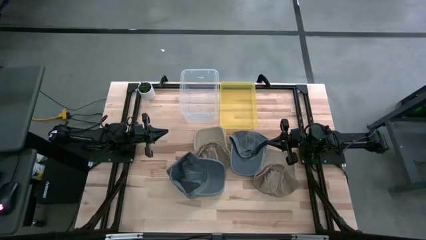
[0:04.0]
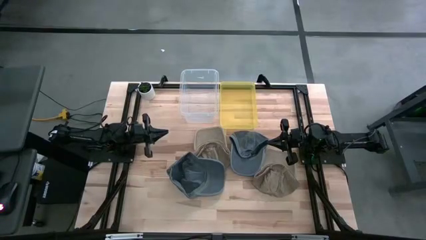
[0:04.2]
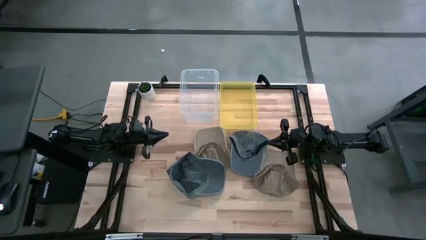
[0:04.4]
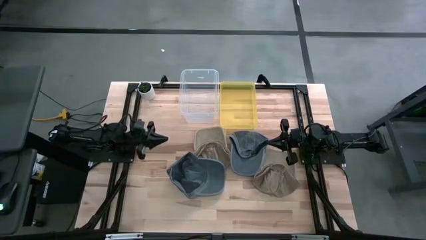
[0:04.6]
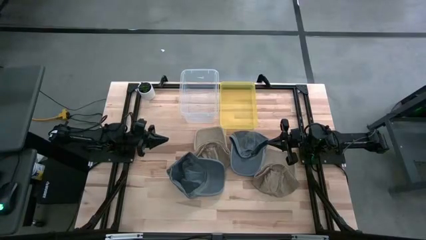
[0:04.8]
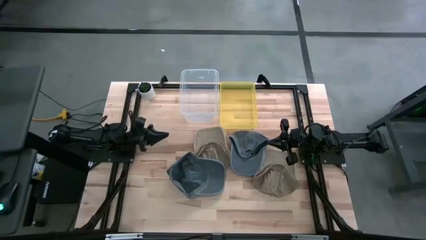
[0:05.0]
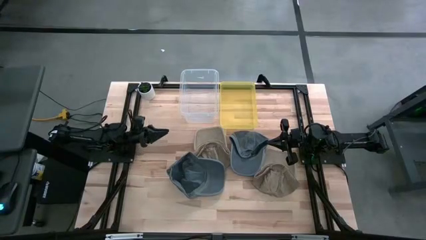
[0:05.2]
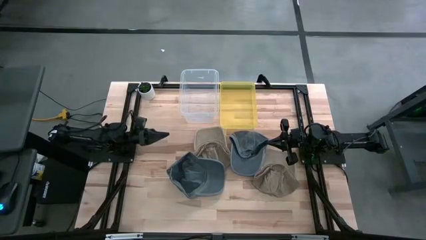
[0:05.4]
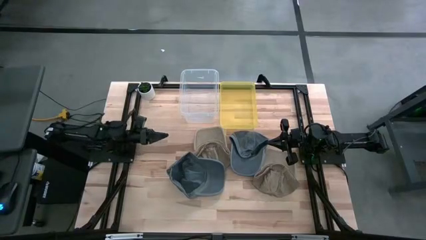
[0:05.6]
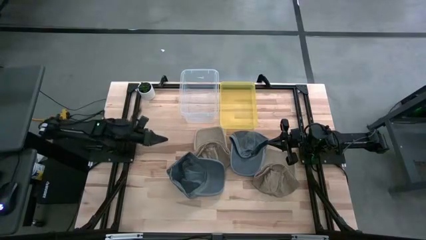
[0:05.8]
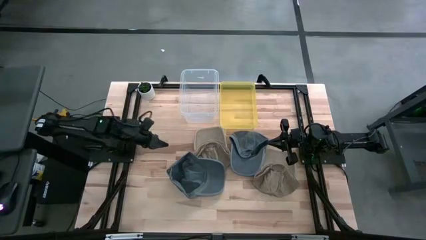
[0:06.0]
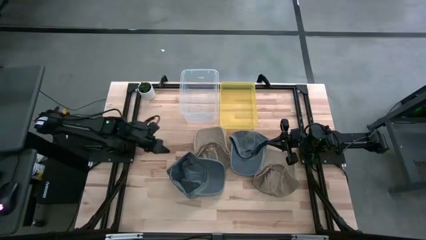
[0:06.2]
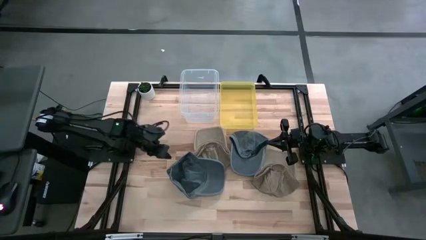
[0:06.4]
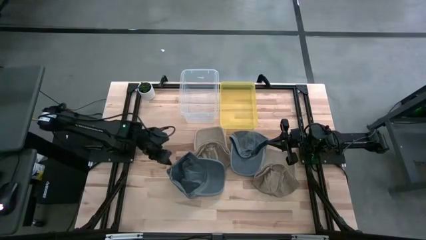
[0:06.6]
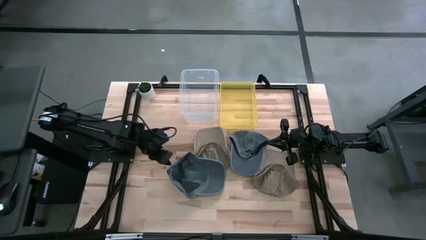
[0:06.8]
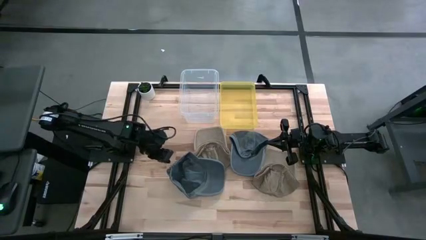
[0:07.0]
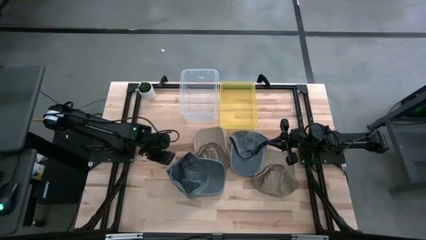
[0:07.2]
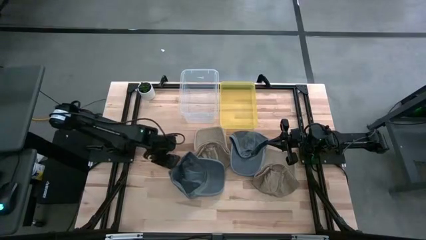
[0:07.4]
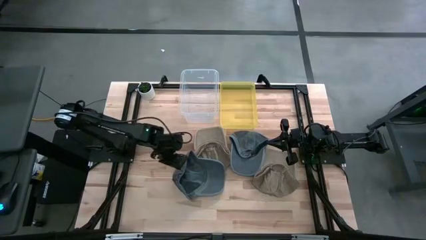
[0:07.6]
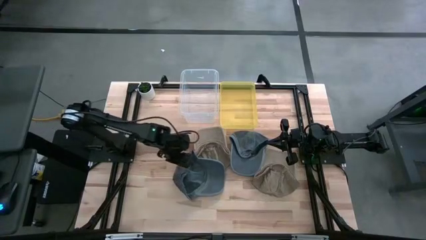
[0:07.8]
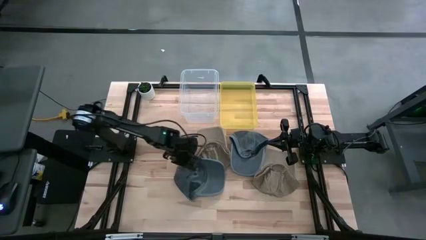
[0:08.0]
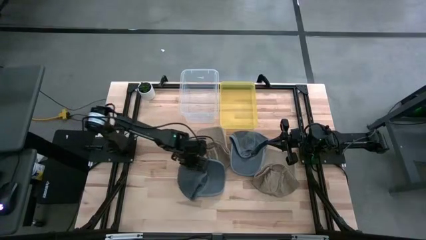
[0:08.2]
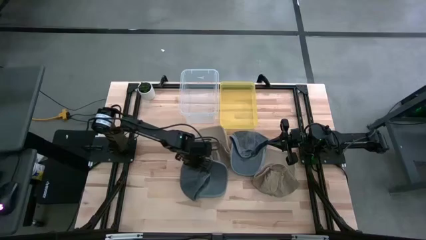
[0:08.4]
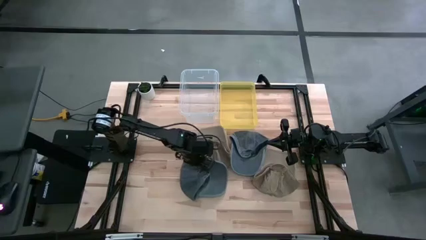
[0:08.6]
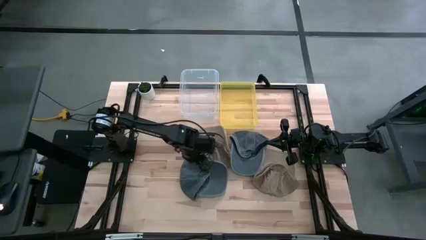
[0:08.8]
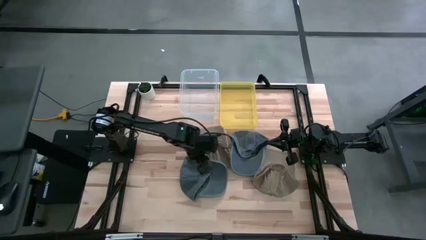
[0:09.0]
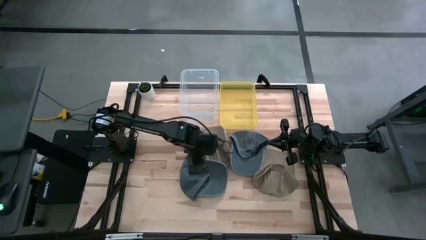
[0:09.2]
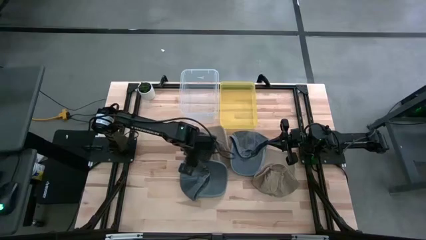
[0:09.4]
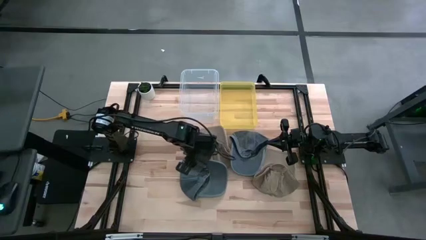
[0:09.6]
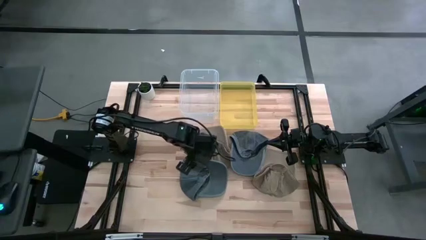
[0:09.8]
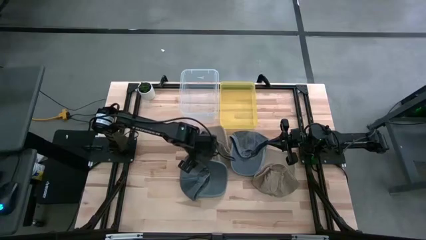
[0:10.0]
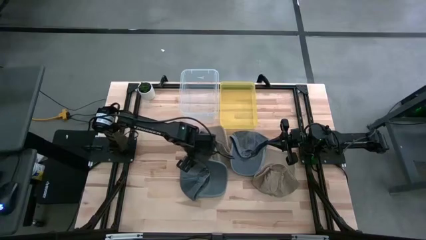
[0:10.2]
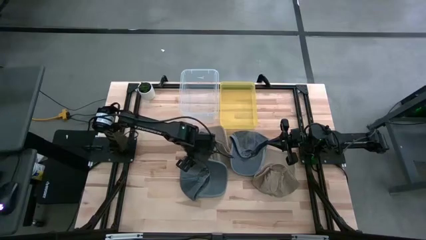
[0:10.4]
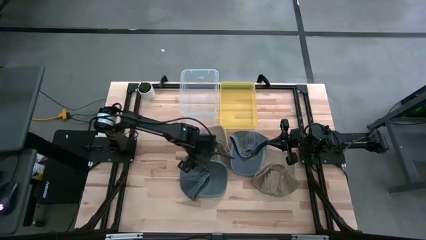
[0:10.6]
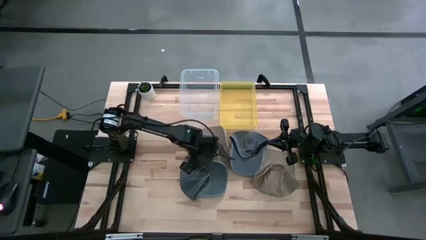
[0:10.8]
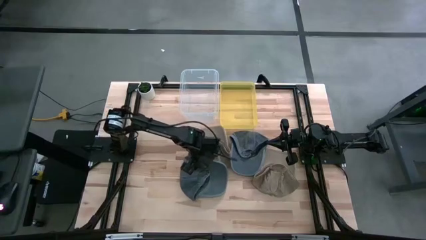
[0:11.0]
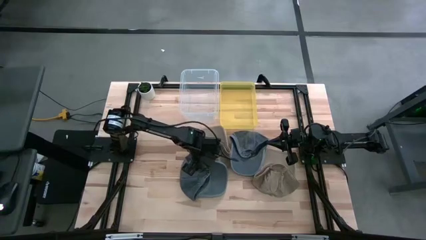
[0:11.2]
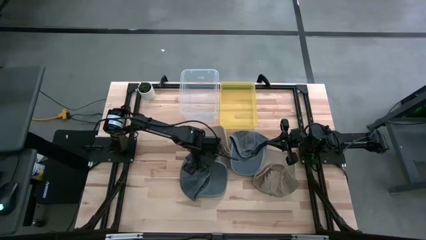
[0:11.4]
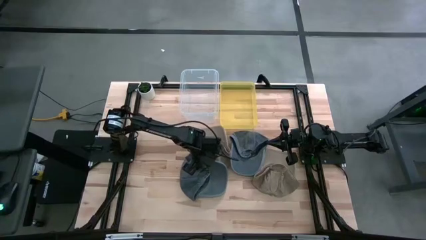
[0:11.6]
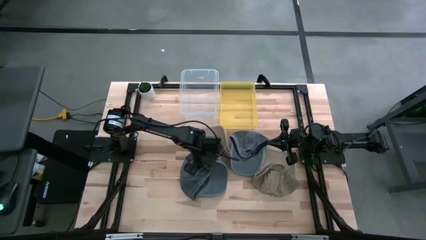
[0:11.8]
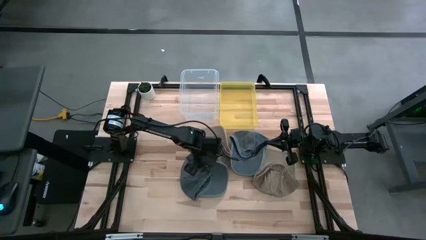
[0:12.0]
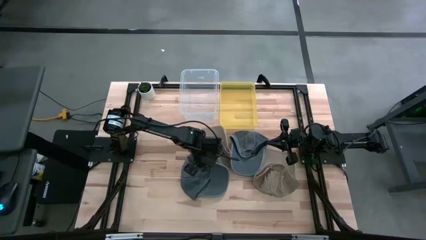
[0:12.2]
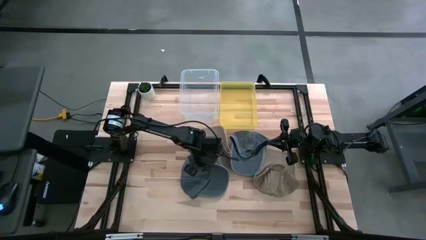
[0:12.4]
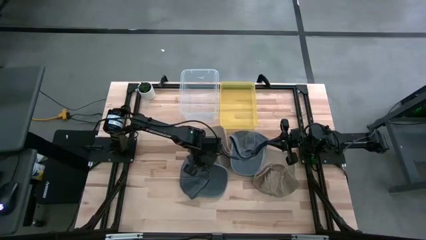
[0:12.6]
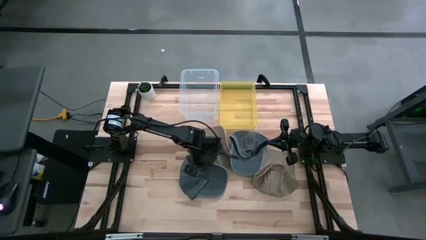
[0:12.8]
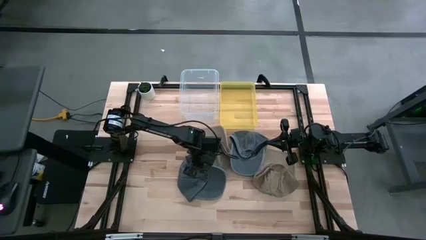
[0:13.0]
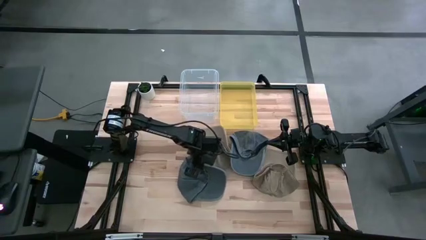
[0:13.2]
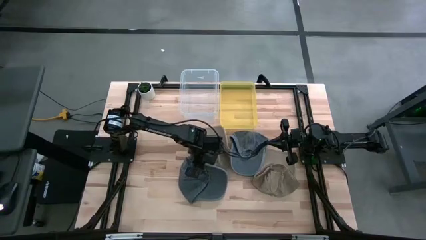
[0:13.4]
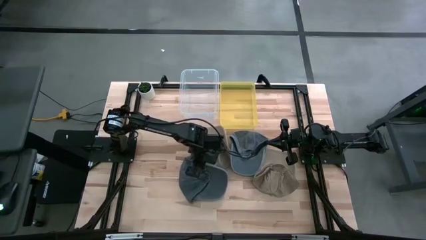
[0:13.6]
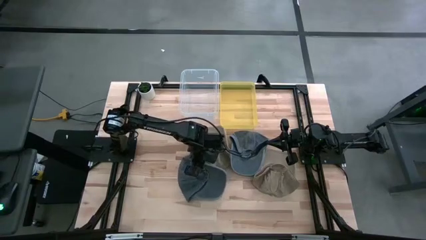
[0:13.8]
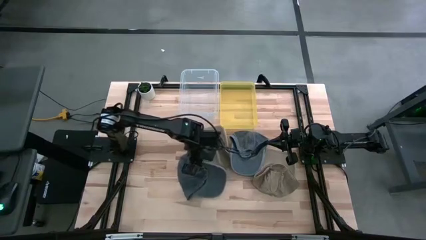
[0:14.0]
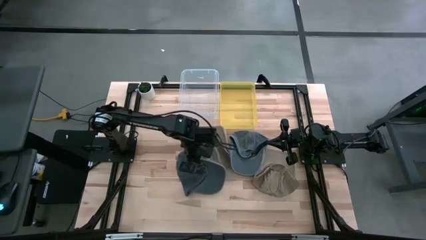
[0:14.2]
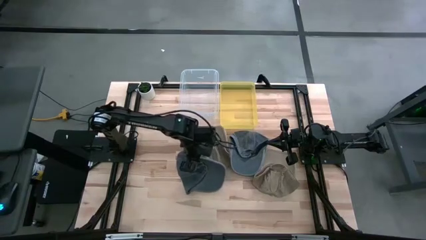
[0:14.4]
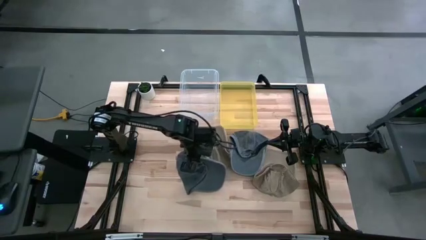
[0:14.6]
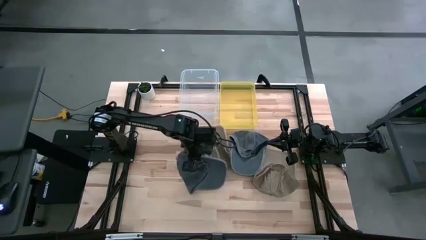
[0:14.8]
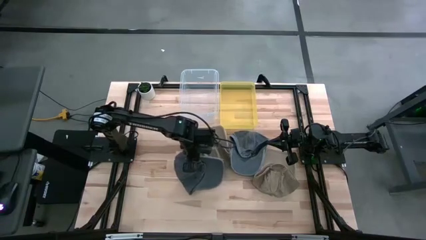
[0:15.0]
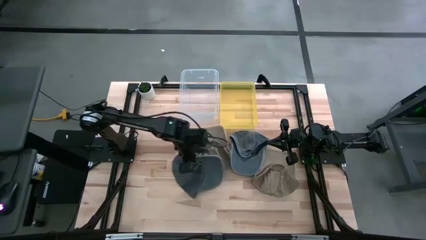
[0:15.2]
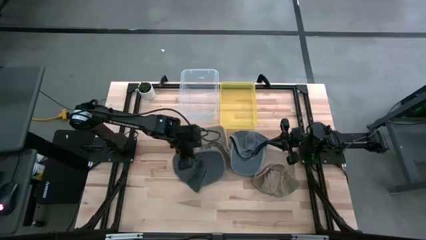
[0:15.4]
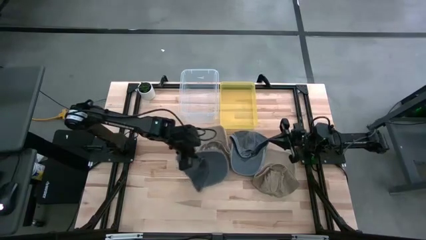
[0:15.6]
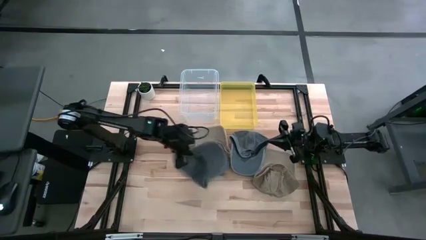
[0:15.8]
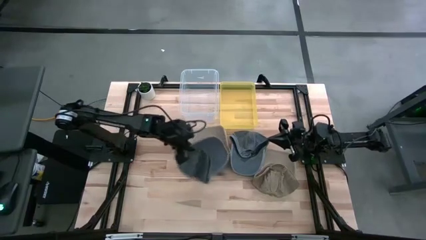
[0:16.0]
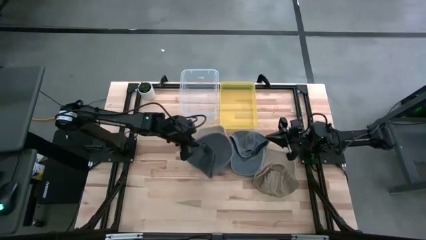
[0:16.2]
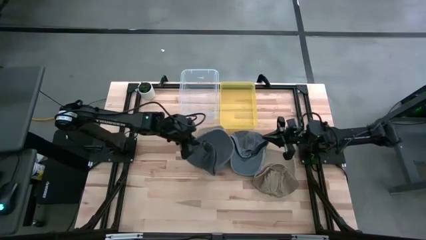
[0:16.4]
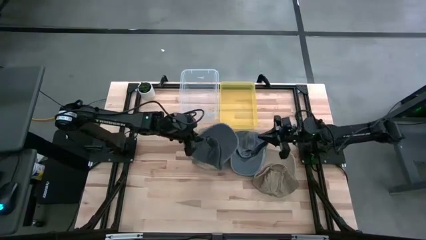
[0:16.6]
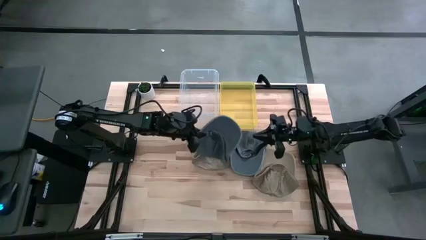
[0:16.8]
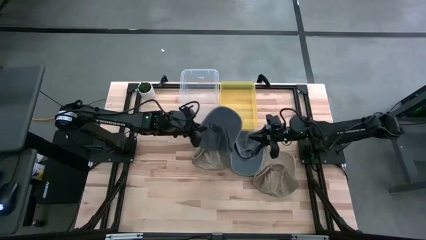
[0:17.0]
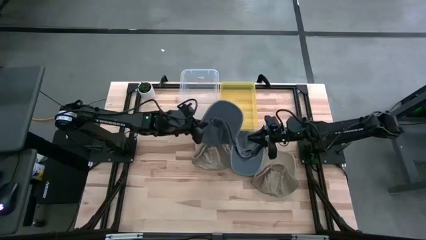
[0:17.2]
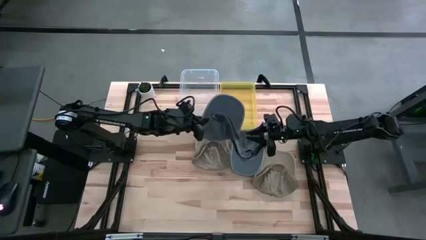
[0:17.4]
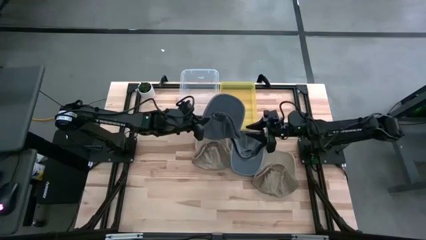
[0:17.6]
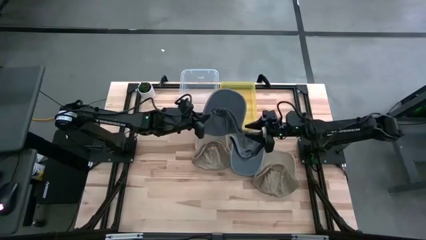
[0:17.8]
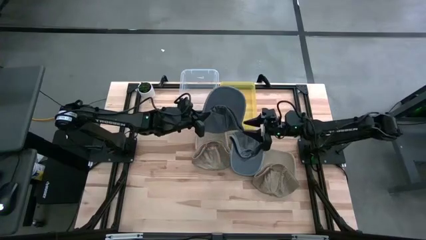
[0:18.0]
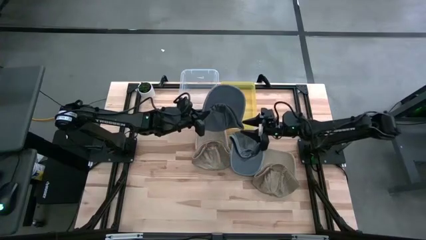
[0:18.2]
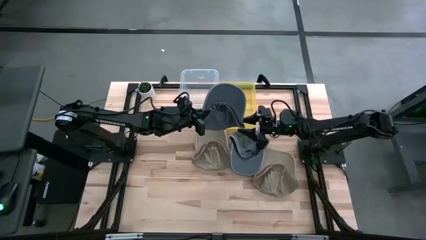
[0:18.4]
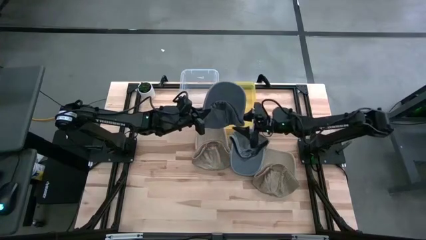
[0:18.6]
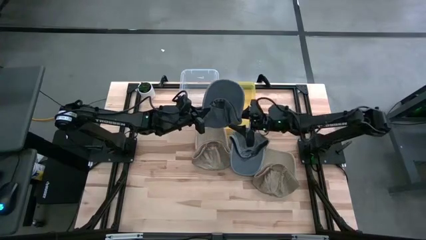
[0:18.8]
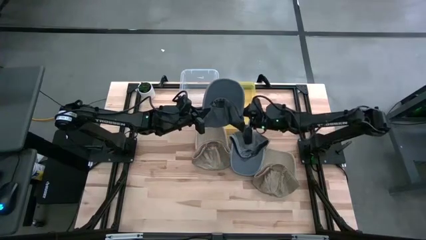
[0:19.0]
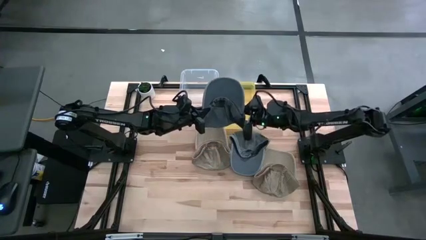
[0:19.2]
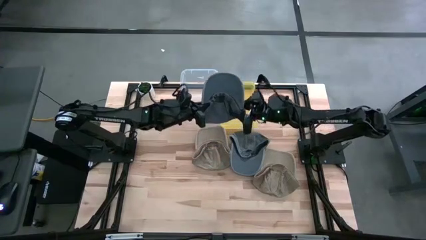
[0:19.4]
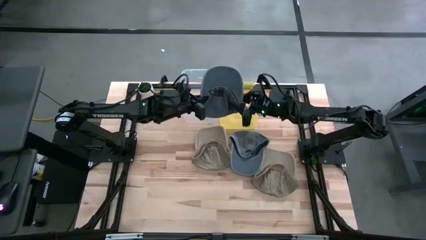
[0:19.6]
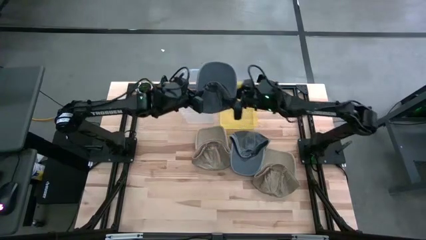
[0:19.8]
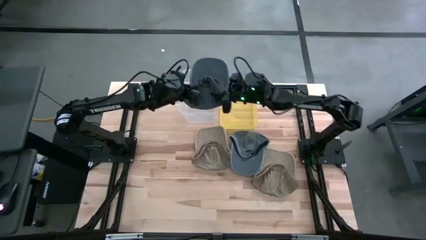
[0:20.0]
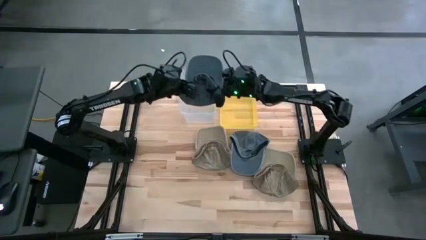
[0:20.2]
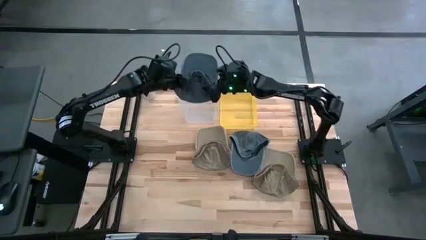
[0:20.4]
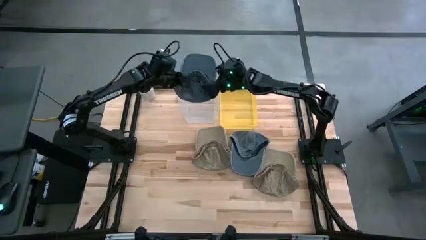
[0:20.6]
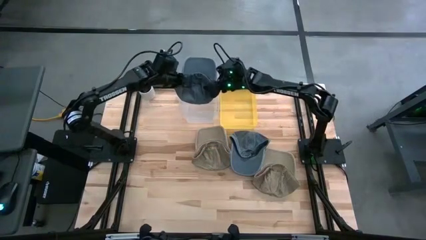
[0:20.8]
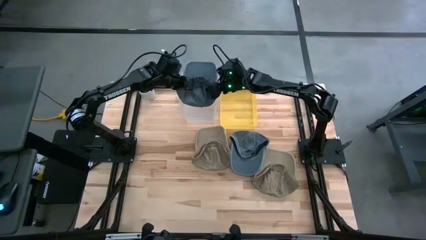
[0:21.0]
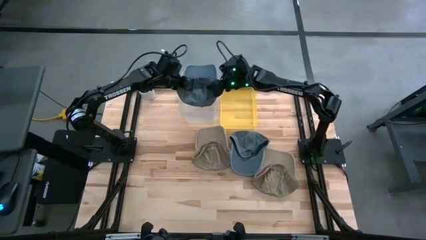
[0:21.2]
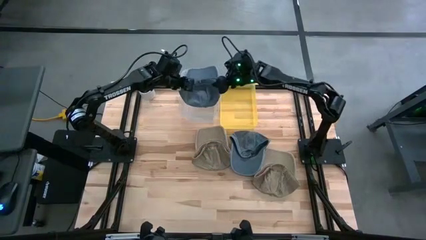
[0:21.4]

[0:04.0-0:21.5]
Task: Pick & Place hat
Put the bottom black cap into the transparent bin
